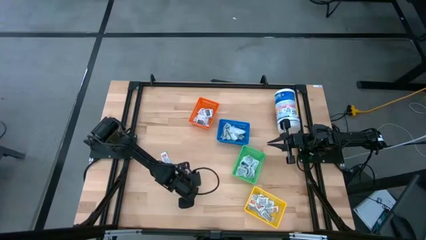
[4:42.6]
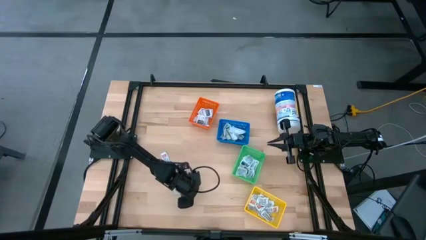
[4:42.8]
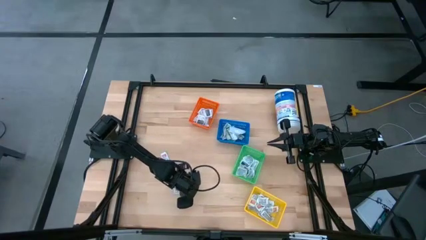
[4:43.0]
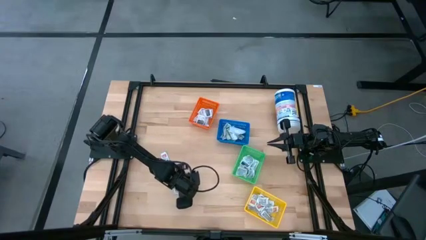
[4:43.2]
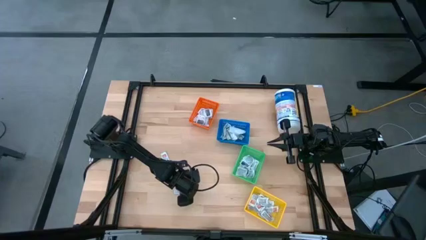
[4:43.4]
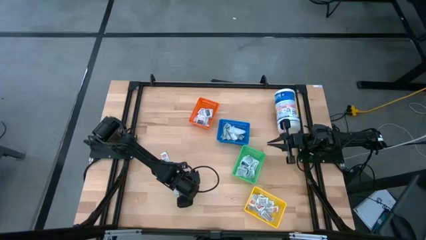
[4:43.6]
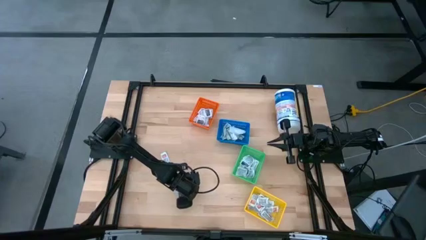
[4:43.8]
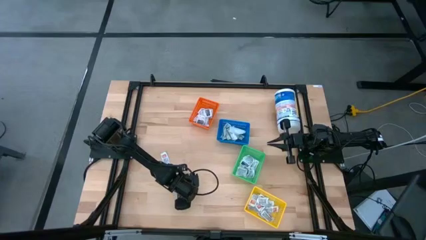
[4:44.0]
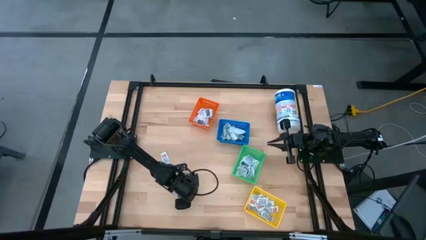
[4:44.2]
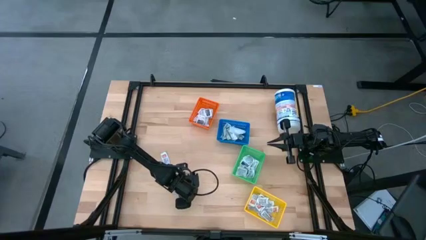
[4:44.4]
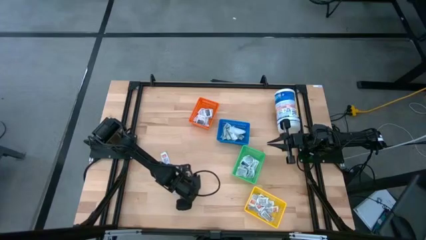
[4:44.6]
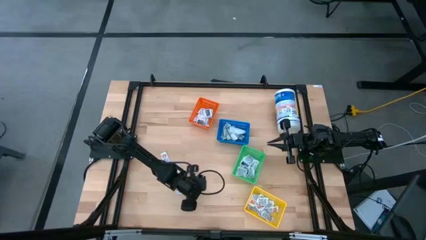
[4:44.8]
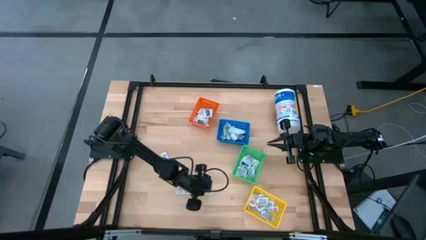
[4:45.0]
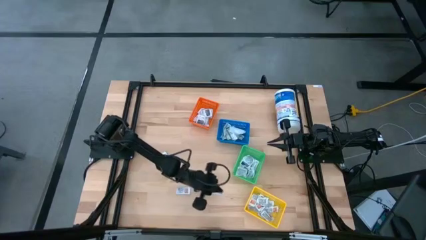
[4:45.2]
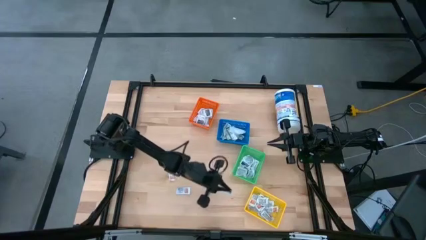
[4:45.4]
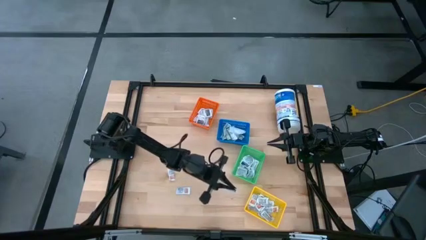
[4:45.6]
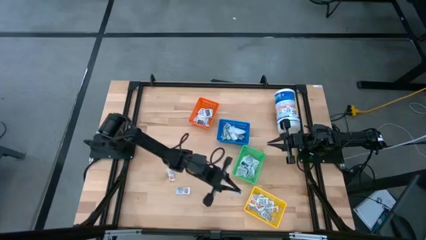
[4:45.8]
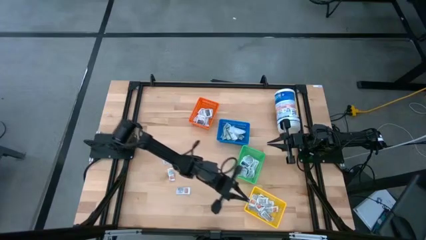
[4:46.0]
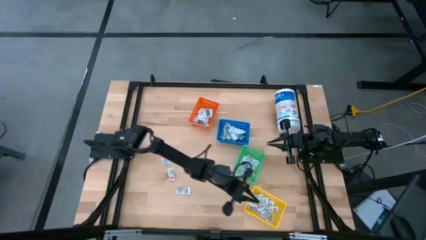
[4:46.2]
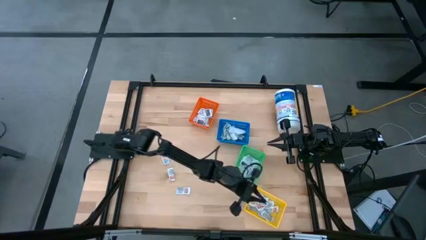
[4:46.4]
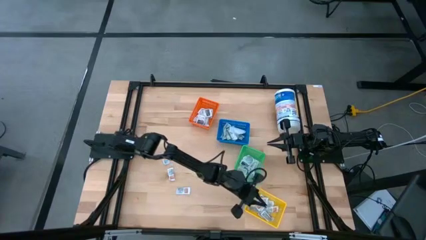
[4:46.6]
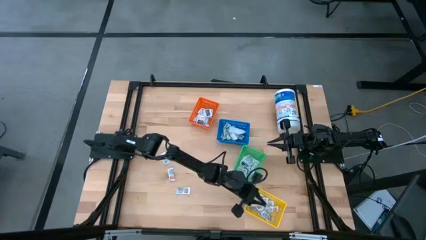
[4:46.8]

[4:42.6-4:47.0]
Task: Pick & Place First Aid Supplies
Put the orange ointment pack into the yellow basket

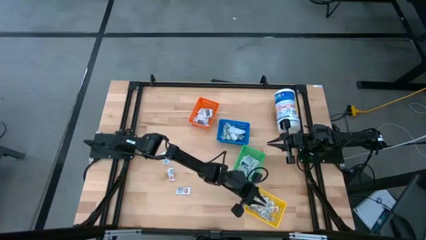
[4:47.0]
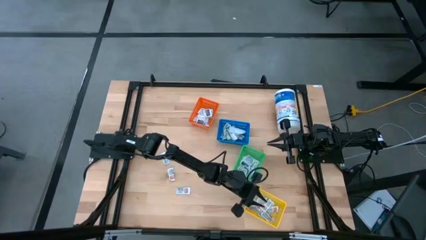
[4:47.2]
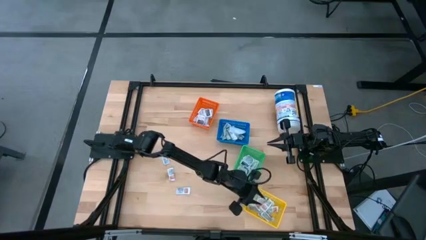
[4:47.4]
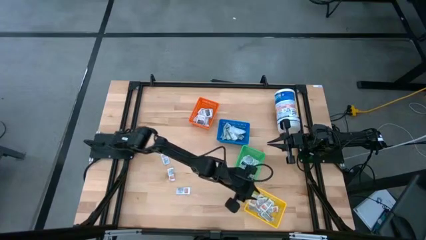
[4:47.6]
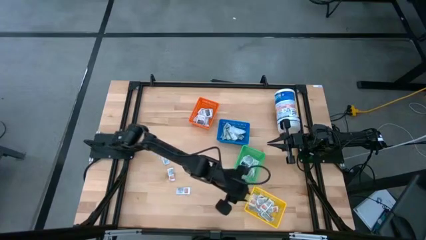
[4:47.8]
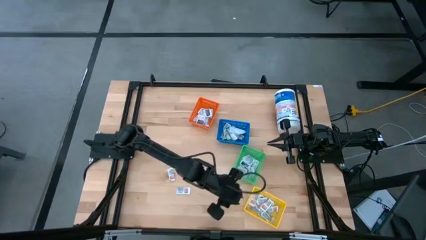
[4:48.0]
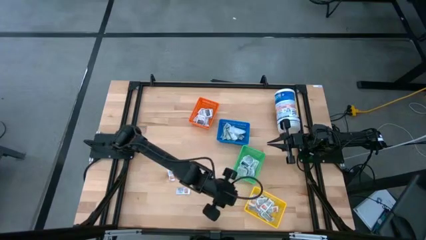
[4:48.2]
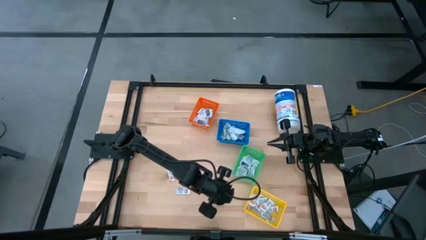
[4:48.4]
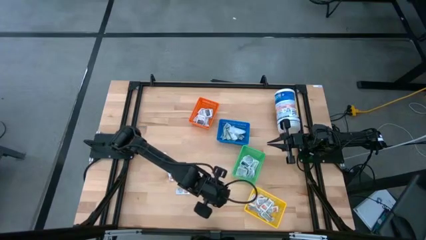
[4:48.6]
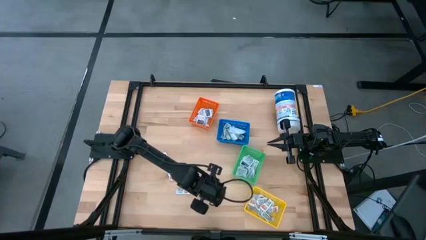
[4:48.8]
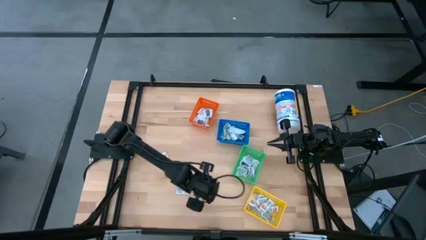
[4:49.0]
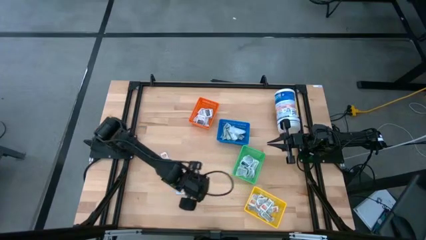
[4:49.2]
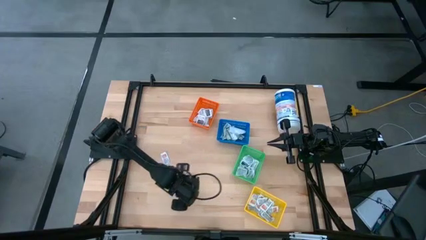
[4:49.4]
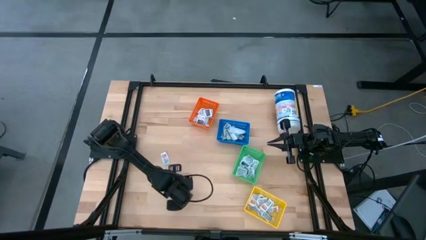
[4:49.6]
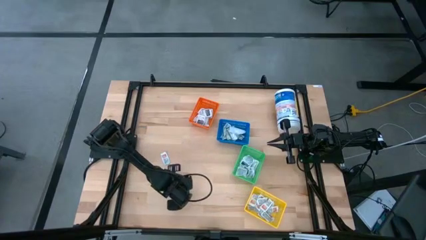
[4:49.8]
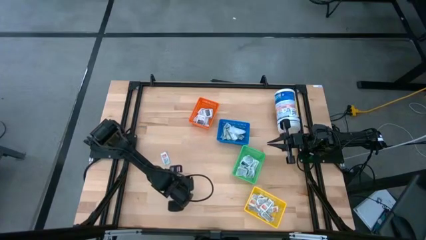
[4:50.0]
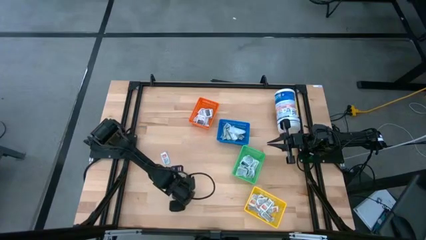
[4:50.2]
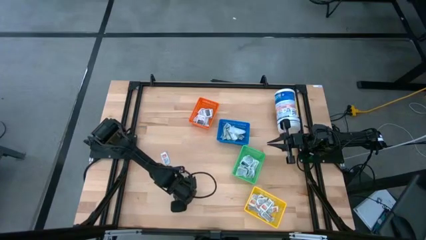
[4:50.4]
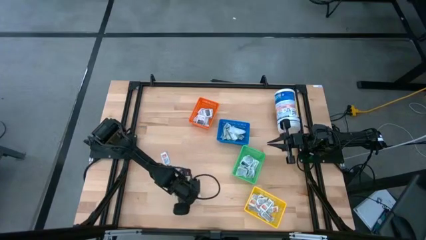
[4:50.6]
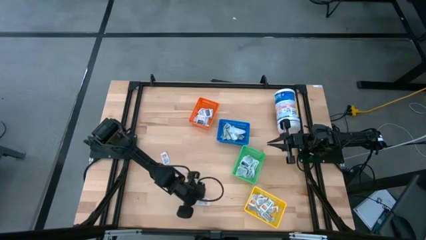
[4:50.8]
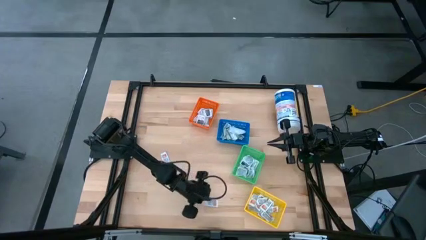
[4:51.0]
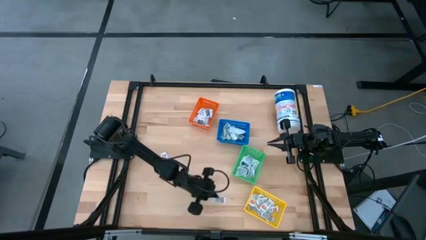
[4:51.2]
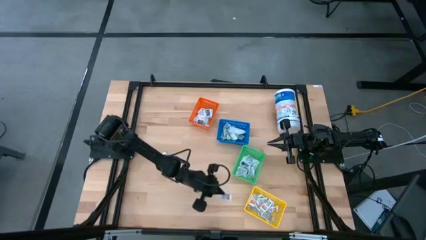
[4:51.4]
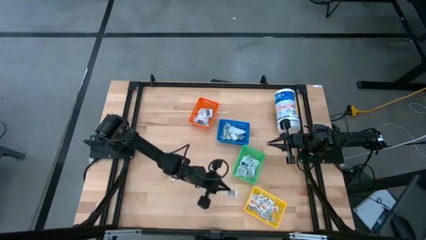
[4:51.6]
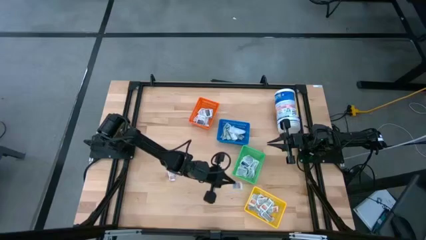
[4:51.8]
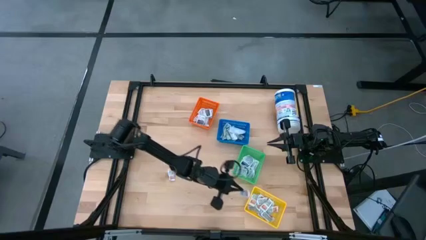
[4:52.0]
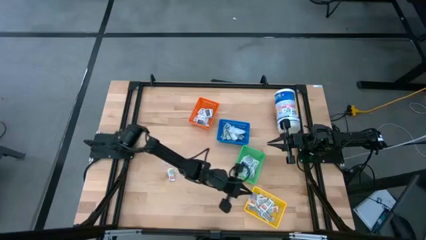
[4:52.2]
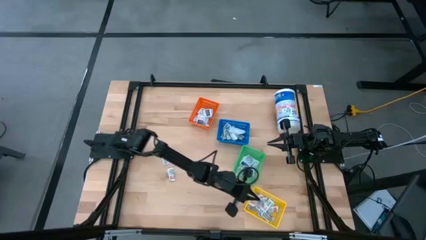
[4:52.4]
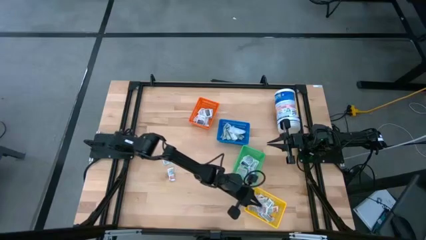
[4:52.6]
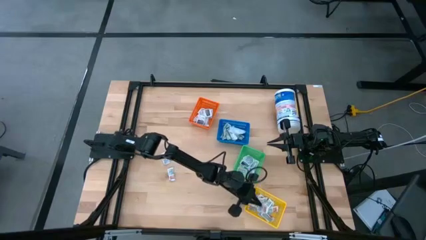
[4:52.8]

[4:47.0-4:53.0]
Put the orange ointment pack into the yellow basket

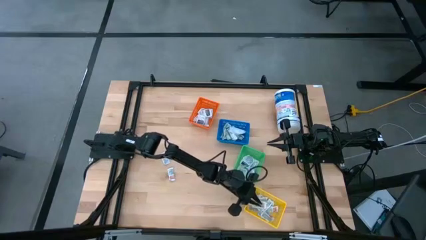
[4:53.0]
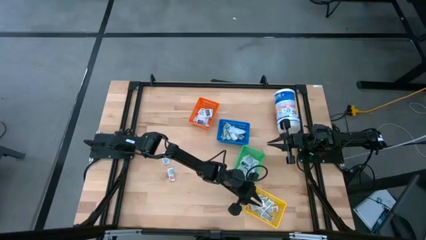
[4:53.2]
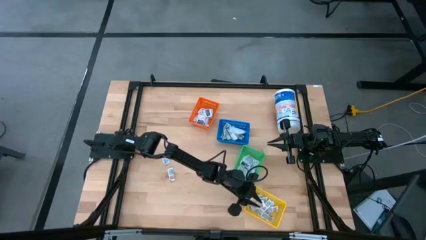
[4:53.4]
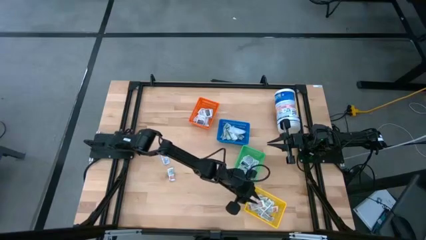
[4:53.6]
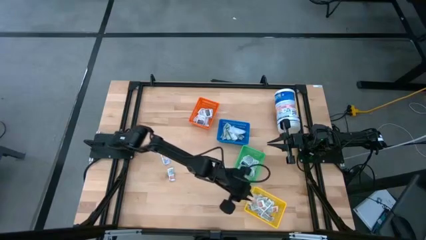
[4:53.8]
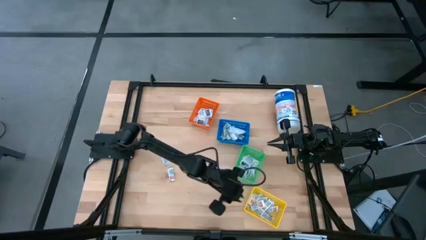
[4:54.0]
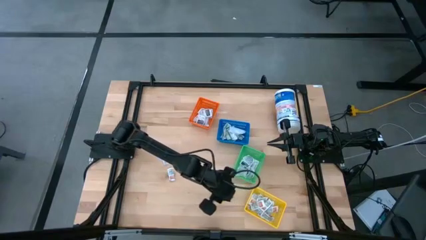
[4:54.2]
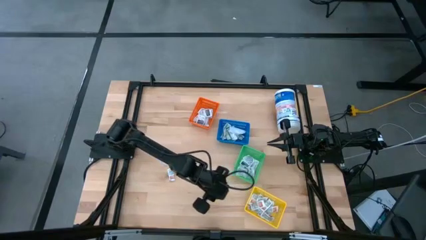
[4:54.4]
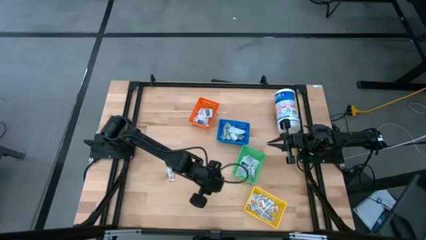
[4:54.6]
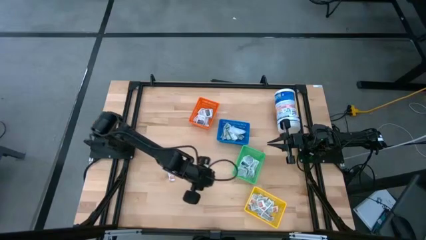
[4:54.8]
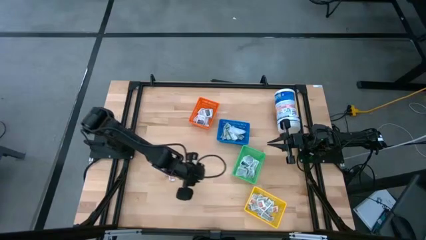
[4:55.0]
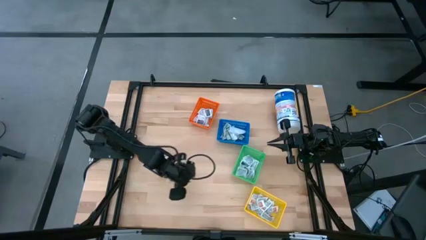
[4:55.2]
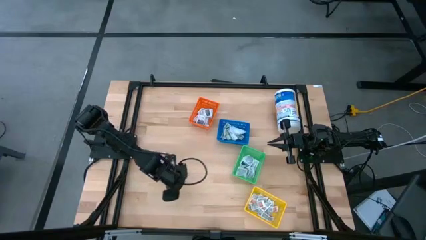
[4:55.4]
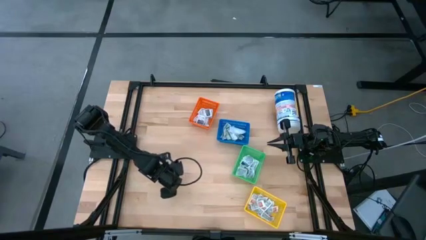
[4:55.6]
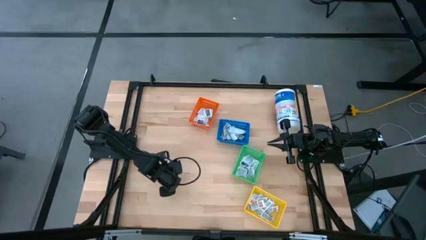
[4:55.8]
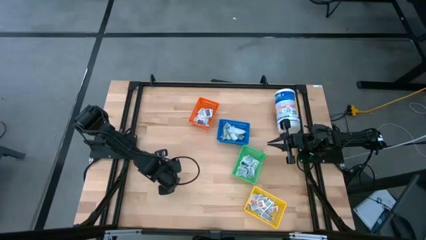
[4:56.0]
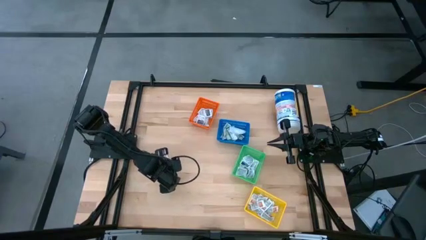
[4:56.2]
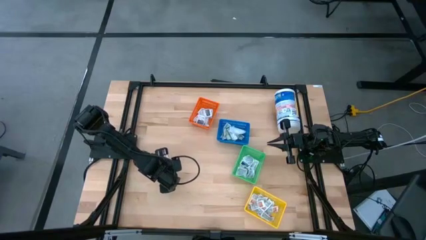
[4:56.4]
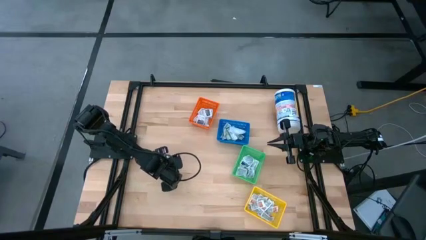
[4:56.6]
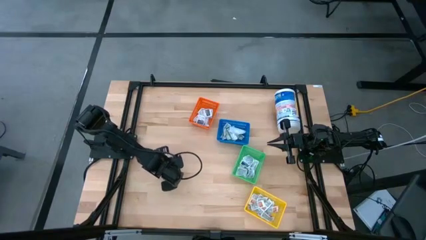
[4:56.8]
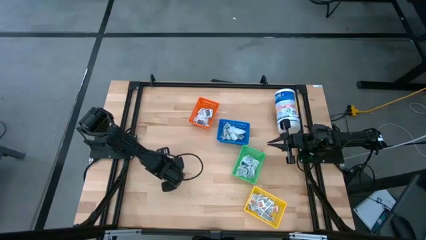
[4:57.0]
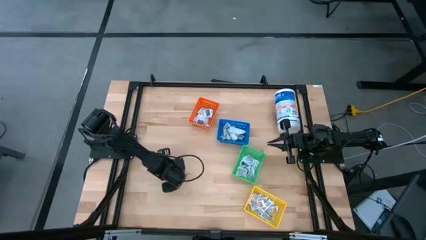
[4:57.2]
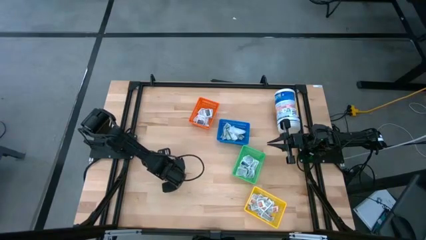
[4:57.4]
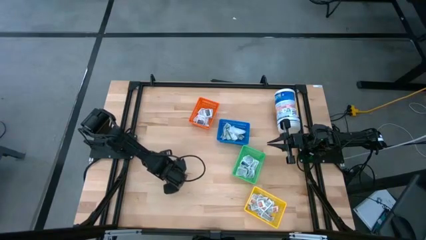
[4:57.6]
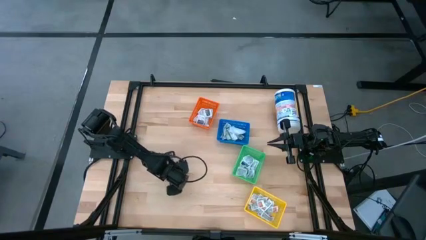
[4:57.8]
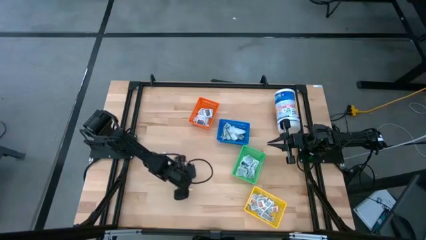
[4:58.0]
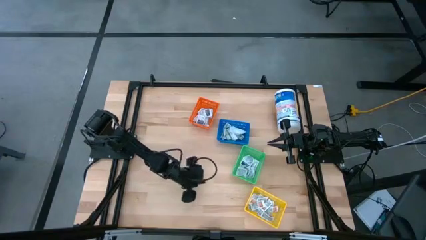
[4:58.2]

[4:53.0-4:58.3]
Put the orange ointment pack into the yellow basket
